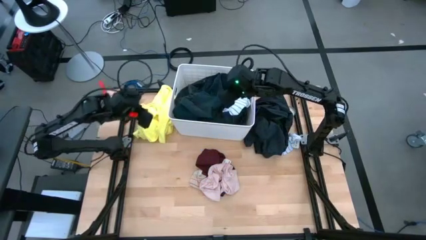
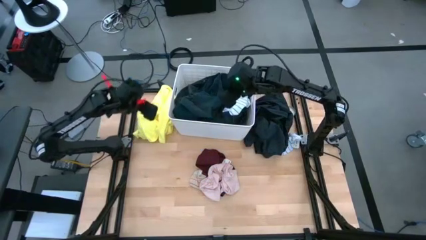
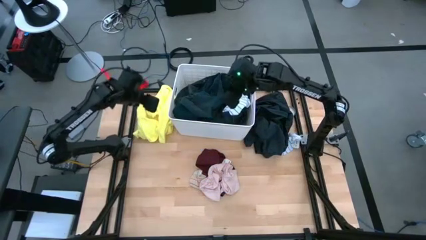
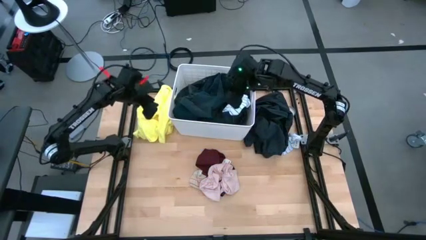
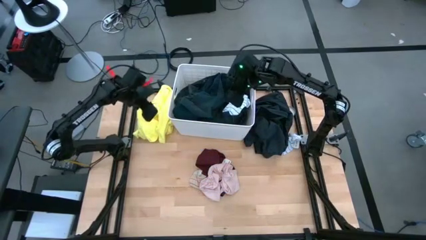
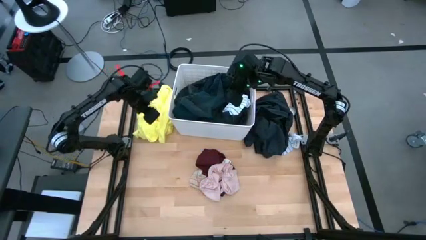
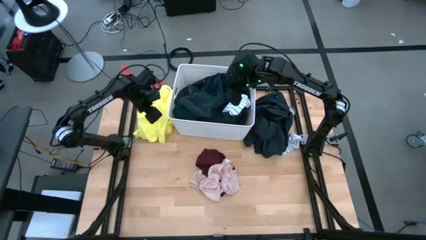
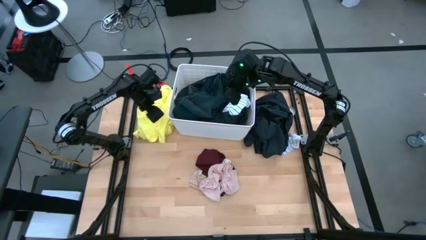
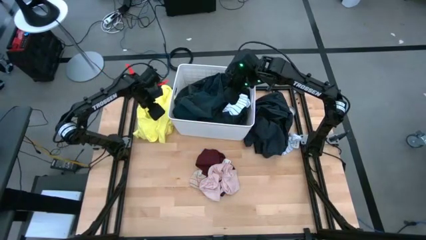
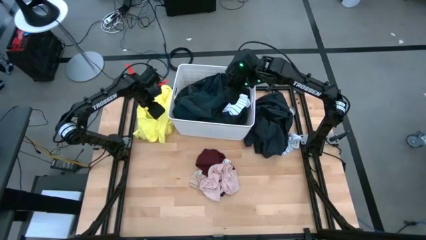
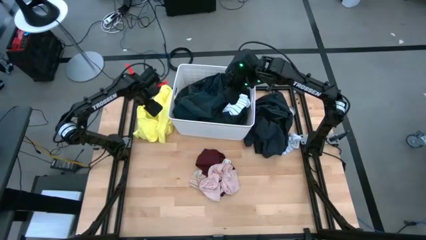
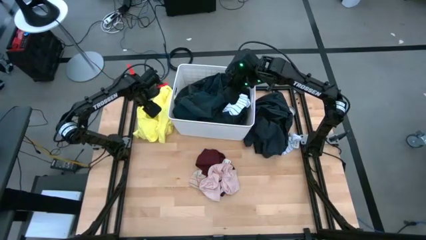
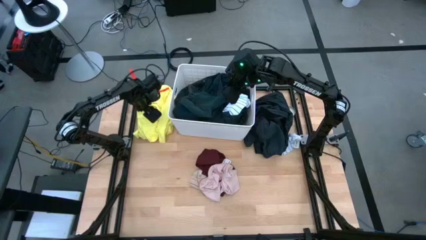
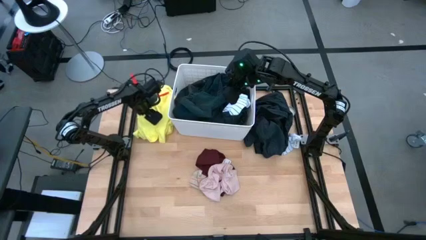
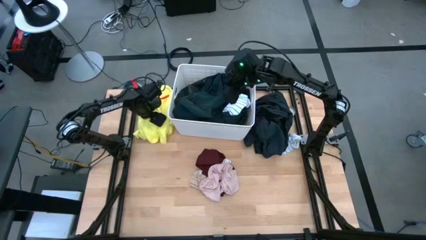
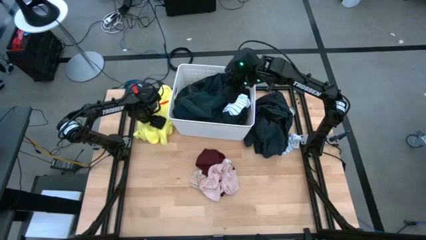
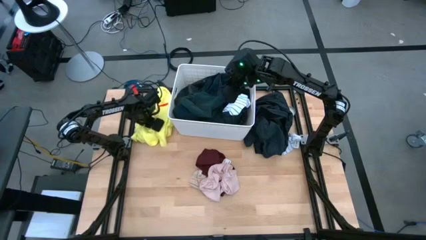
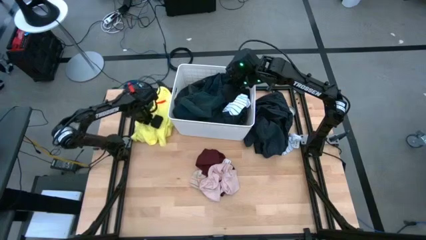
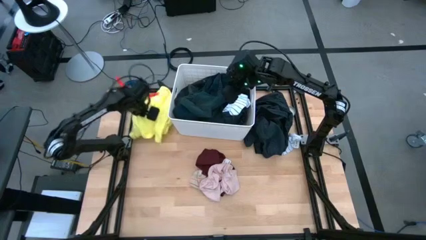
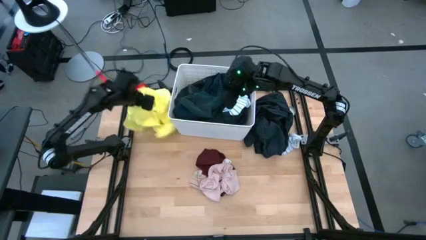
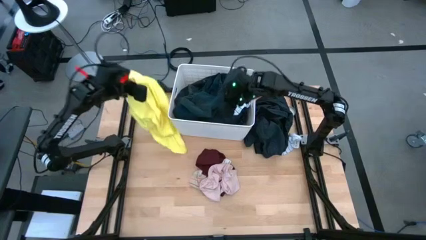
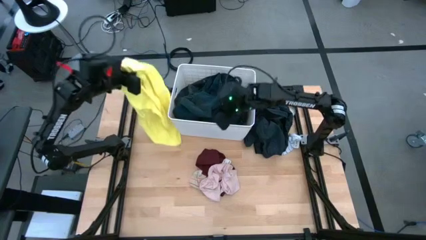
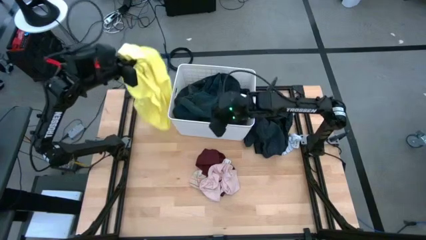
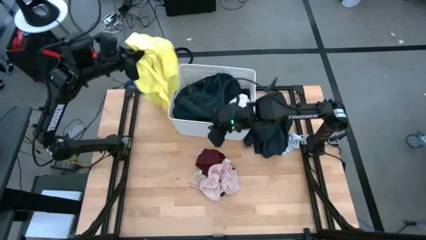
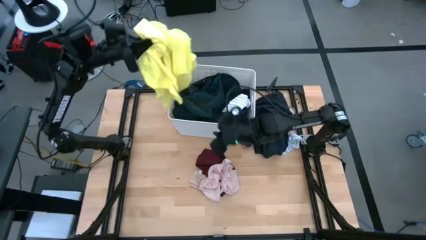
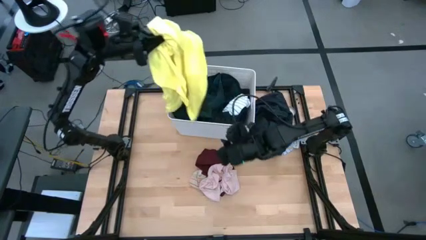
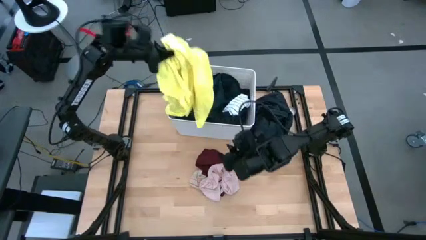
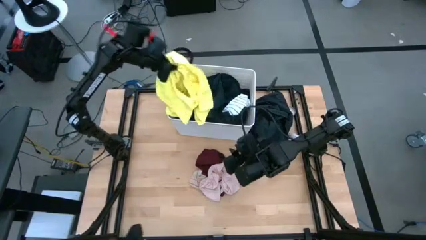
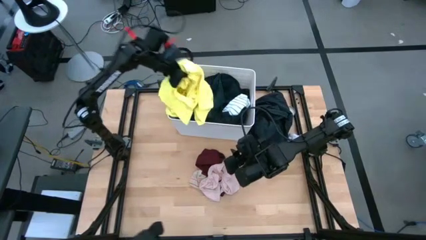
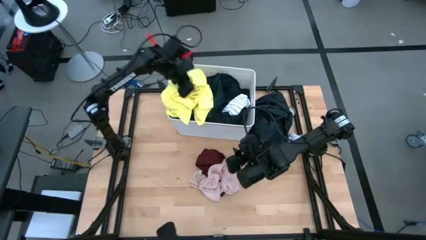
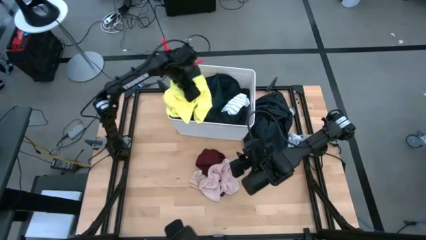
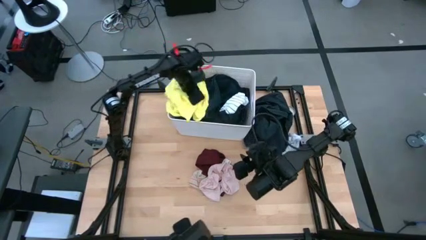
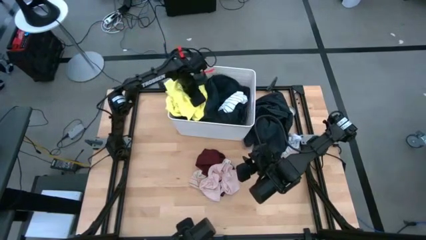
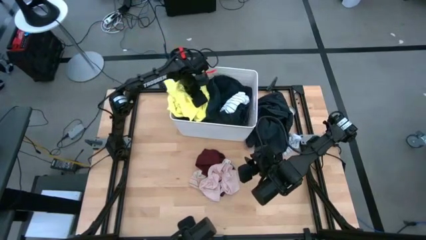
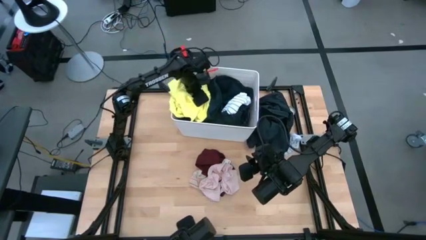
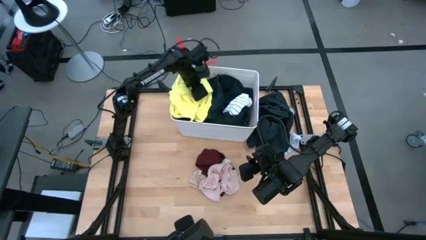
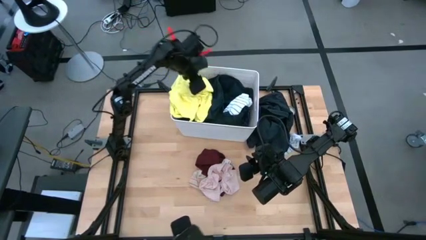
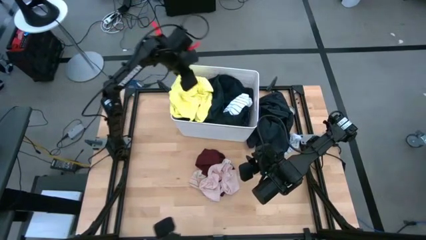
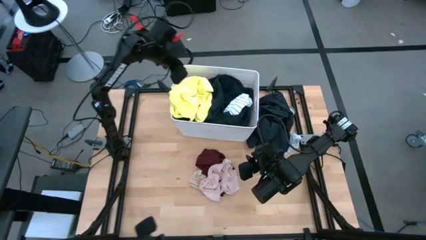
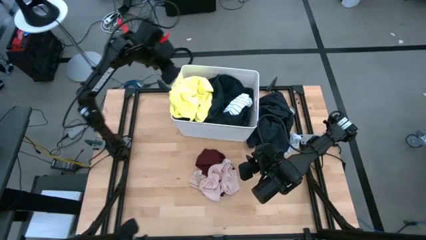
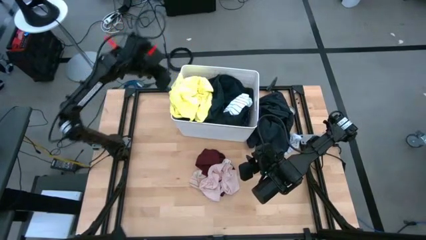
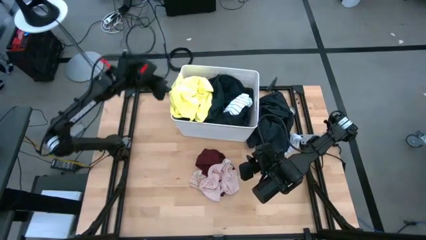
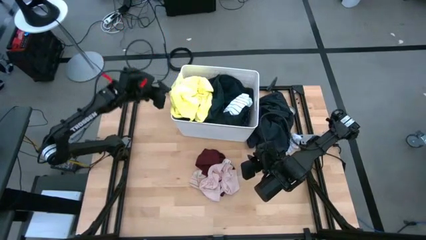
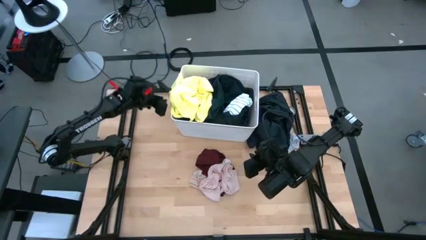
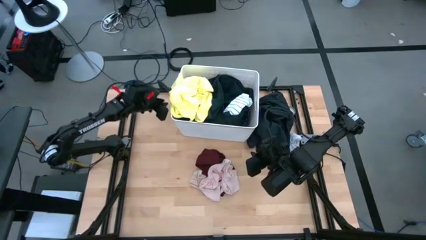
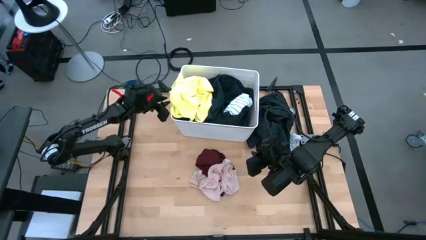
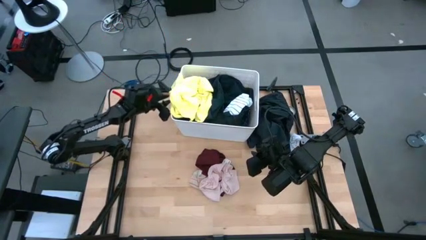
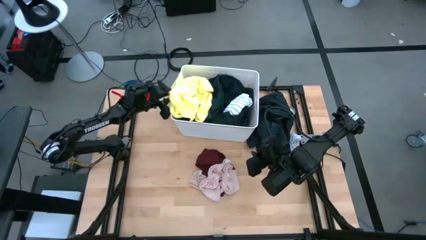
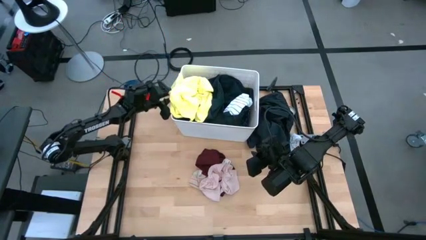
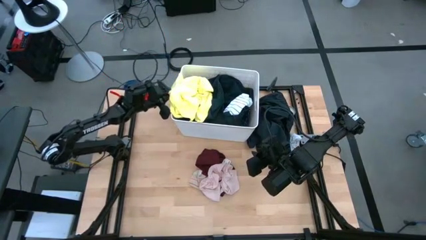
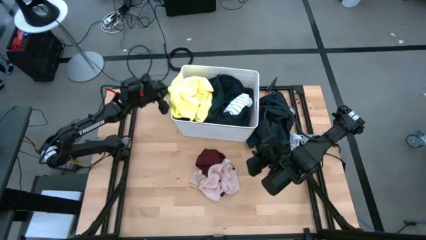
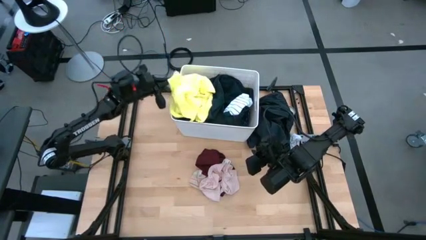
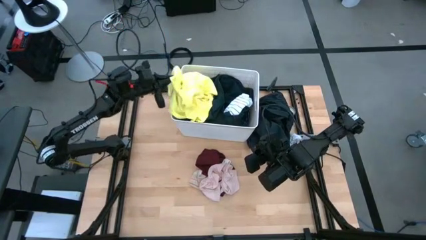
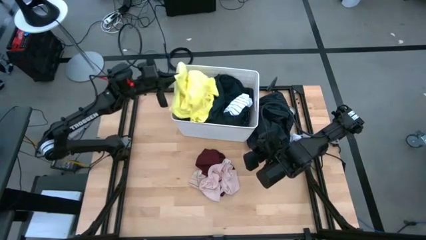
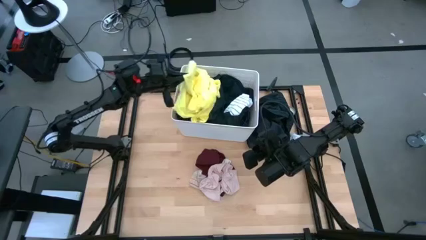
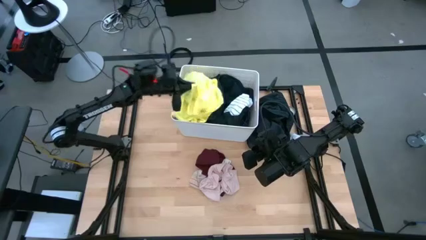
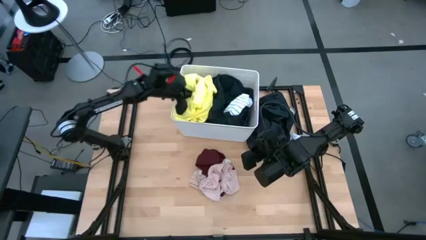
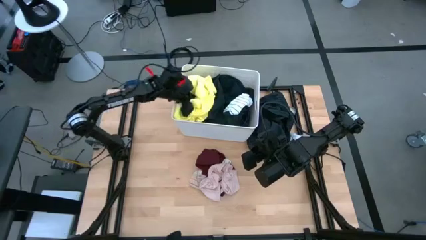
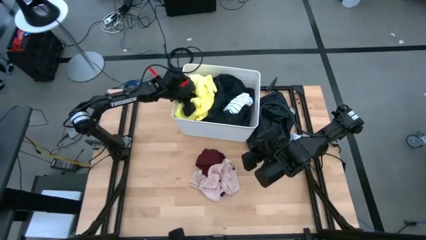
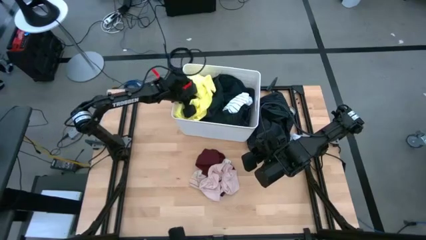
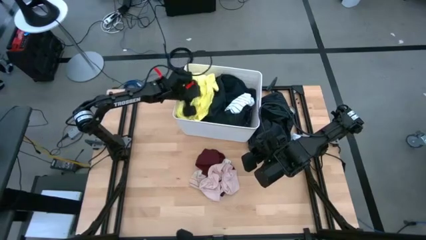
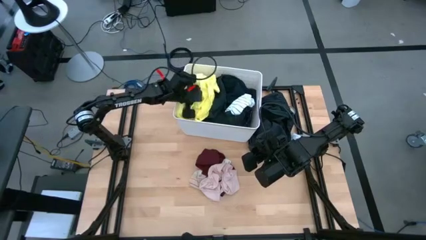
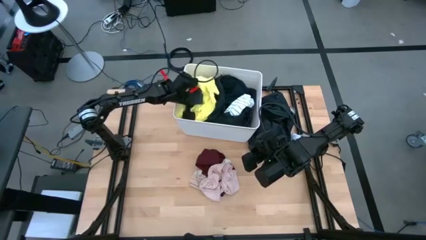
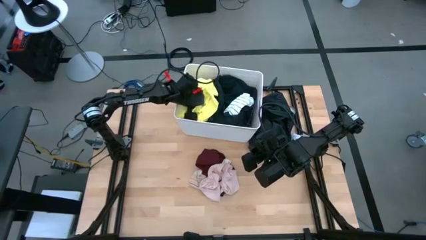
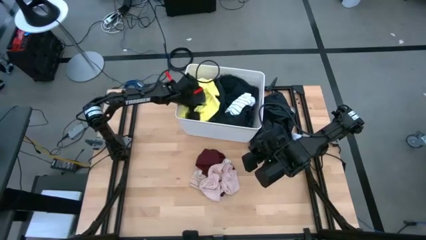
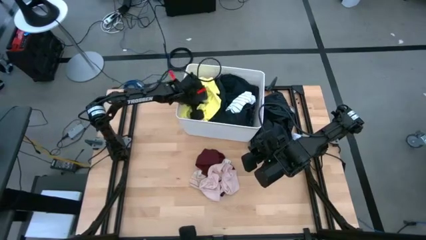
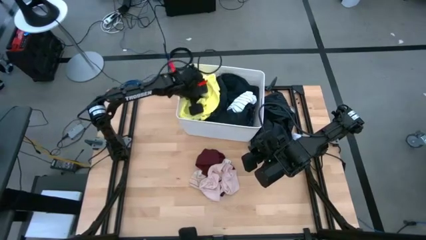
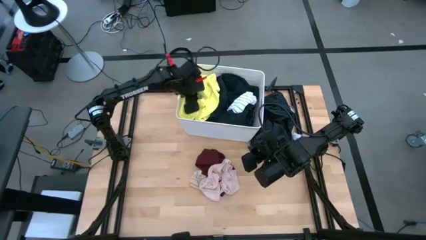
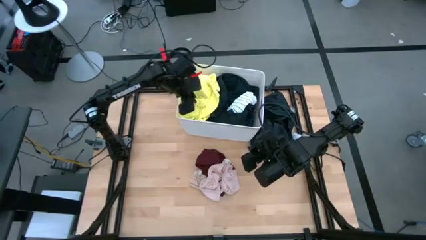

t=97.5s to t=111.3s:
Task: Sort clothes
Put the yellow shirt into the laundry organizer

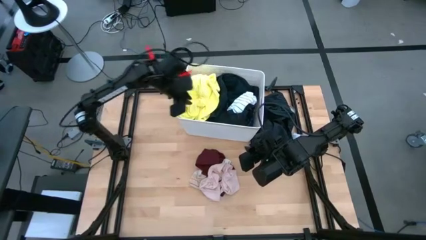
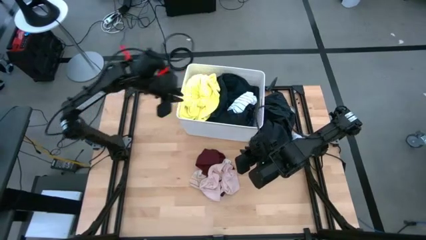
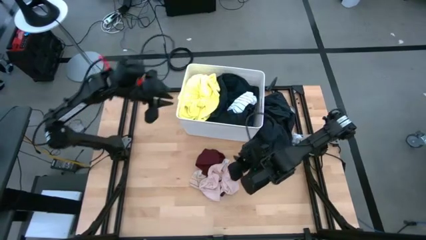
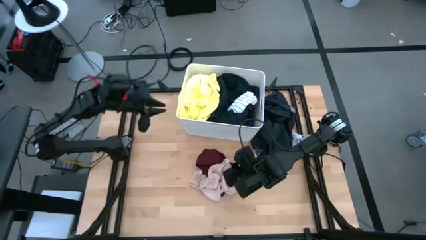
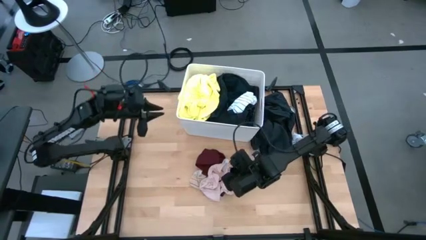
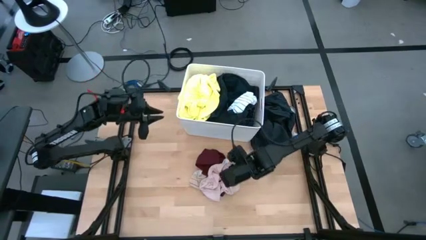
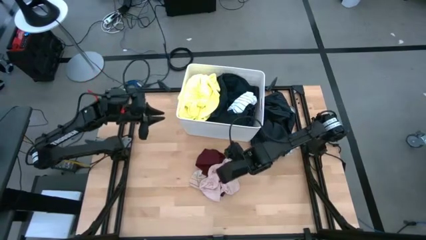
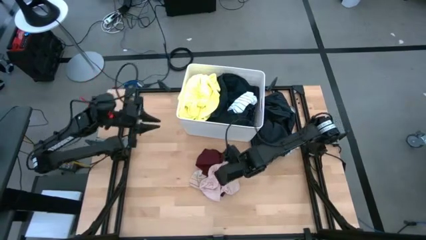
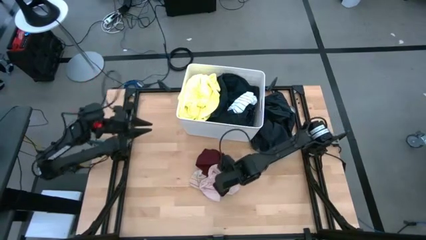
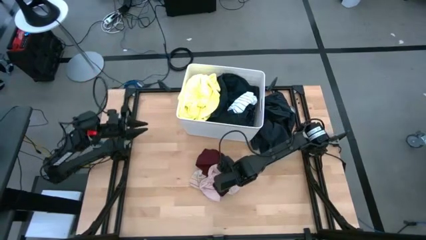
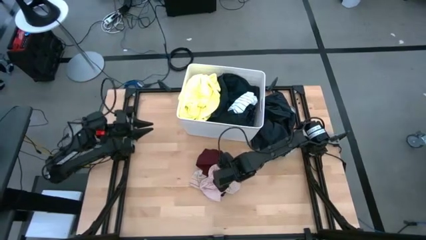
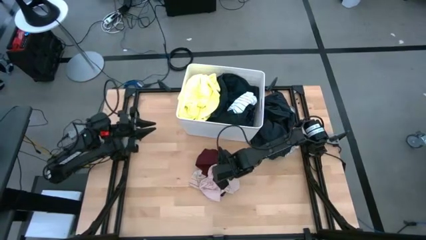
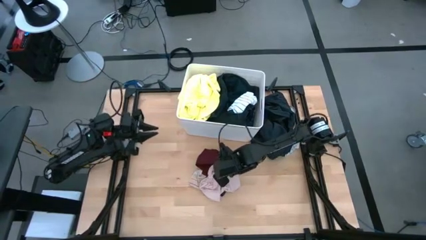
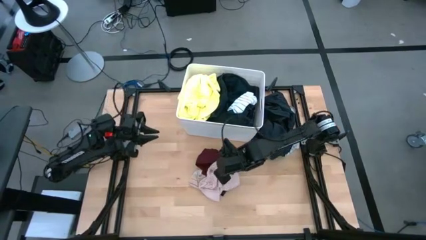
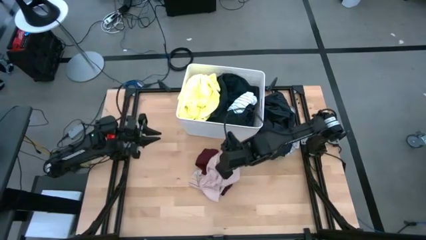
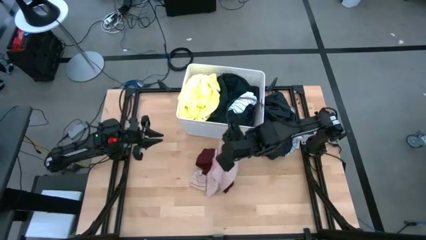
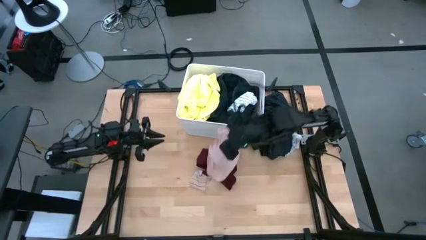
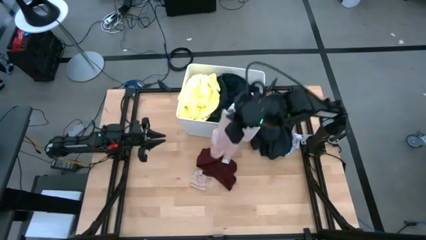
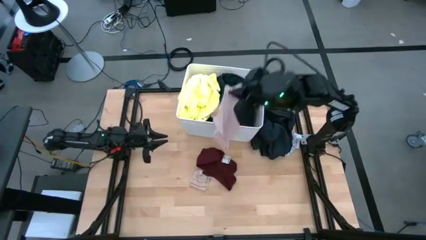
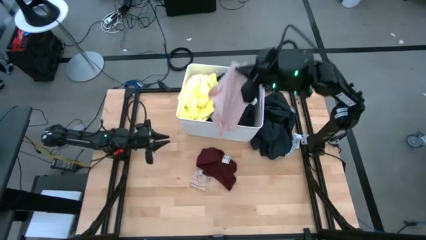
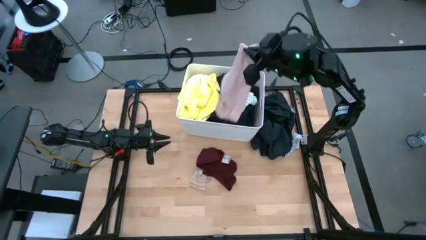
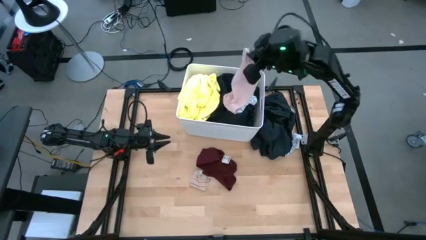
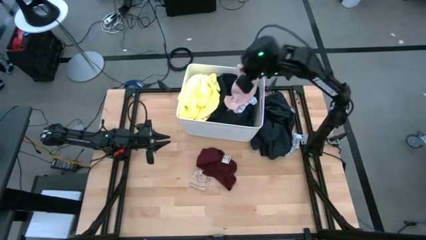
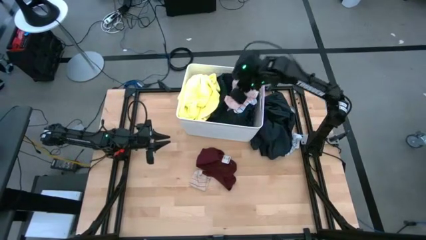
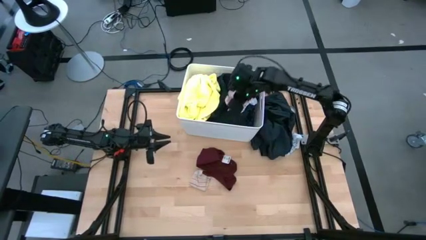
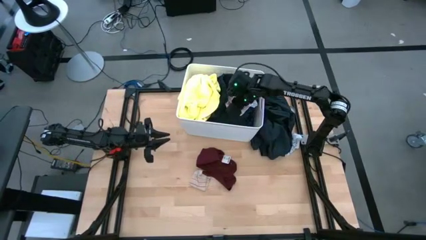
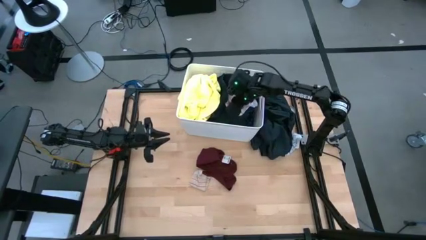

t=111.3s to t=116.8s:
Put the pink top into the laundry organizer
